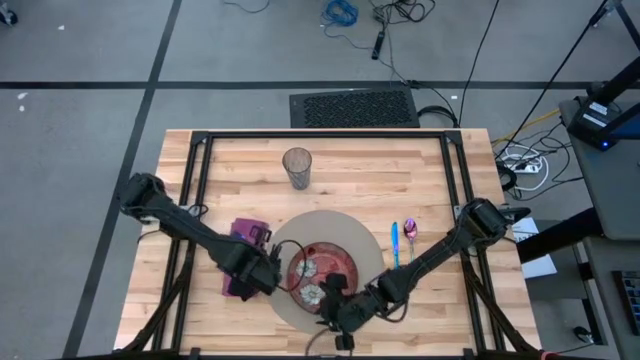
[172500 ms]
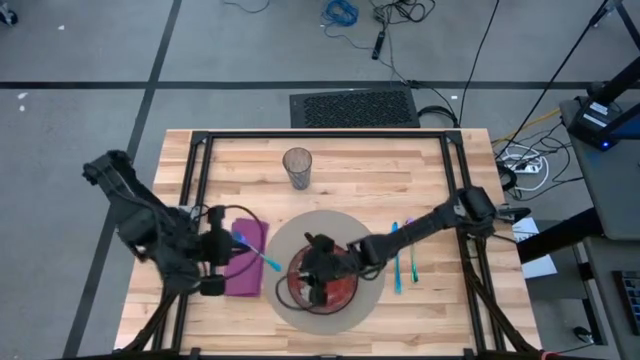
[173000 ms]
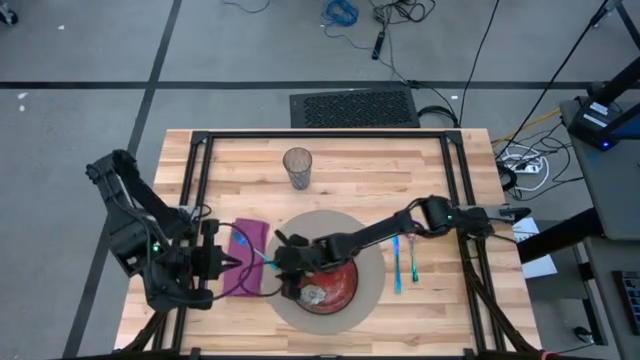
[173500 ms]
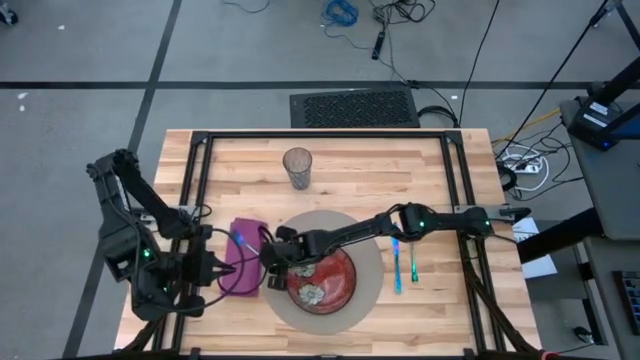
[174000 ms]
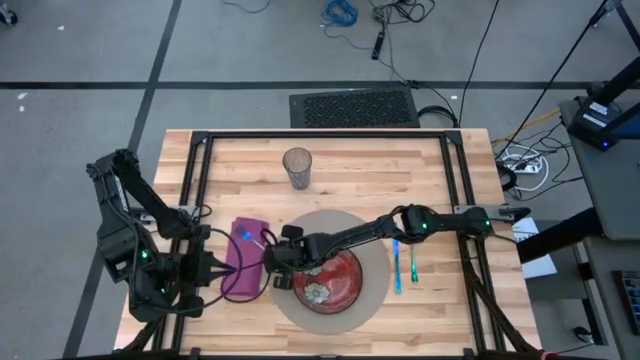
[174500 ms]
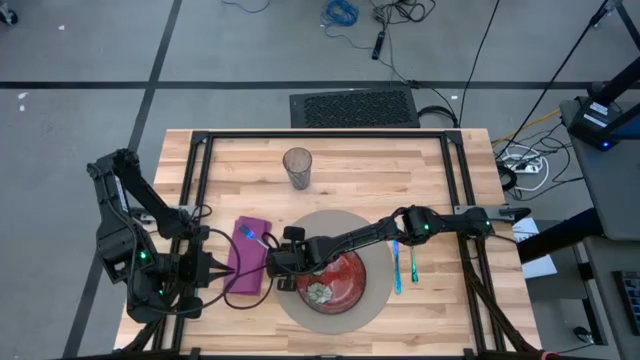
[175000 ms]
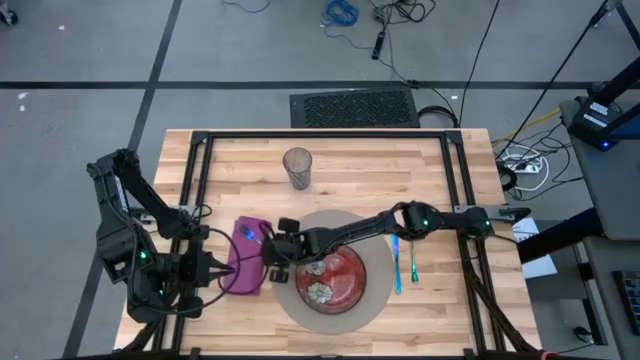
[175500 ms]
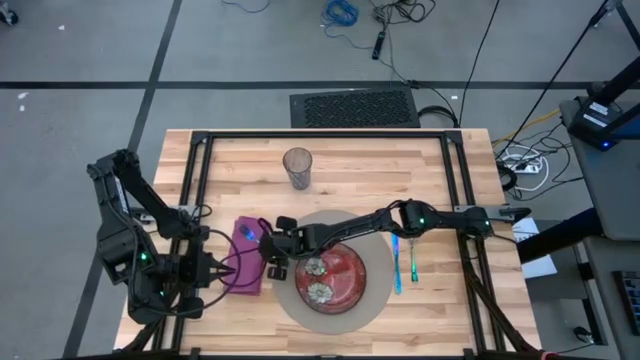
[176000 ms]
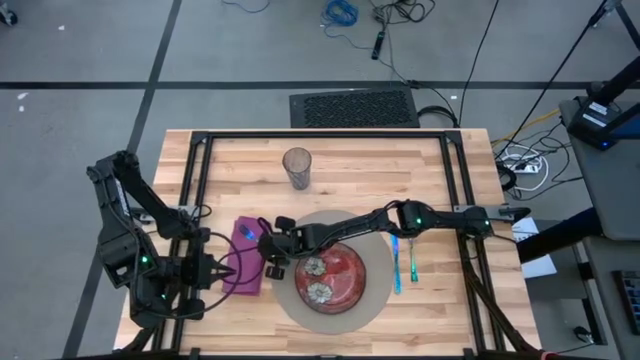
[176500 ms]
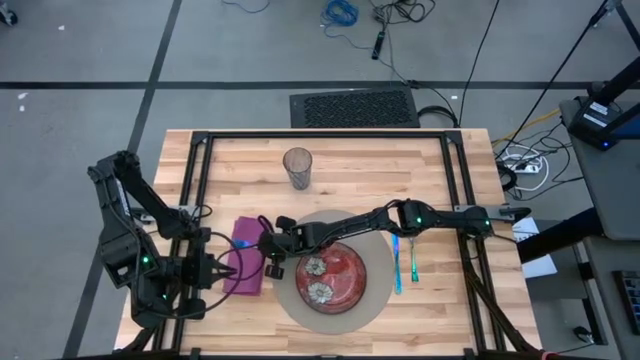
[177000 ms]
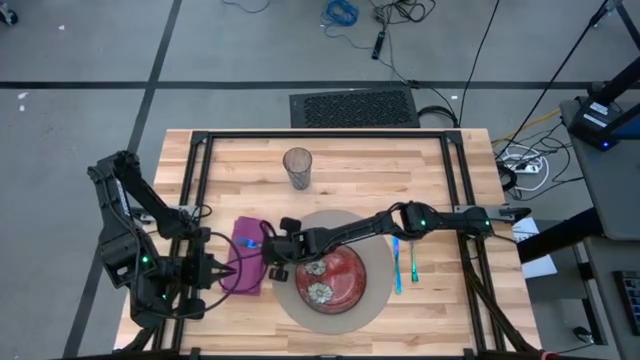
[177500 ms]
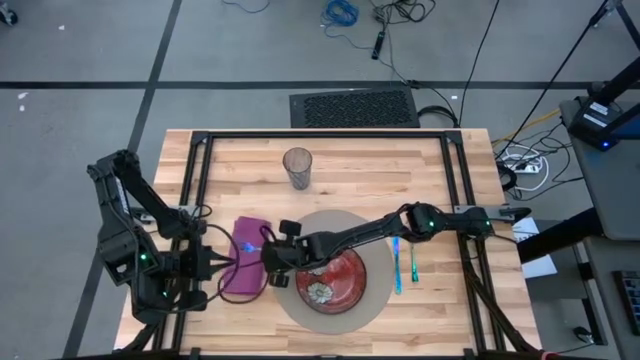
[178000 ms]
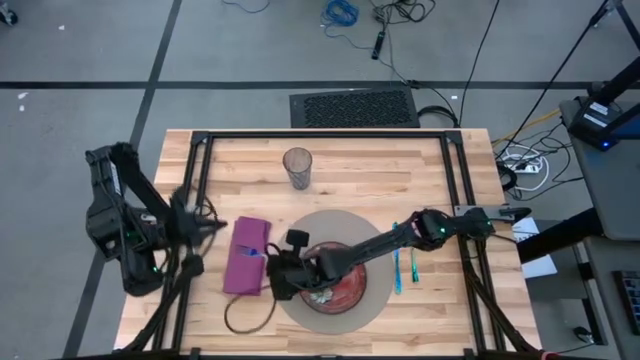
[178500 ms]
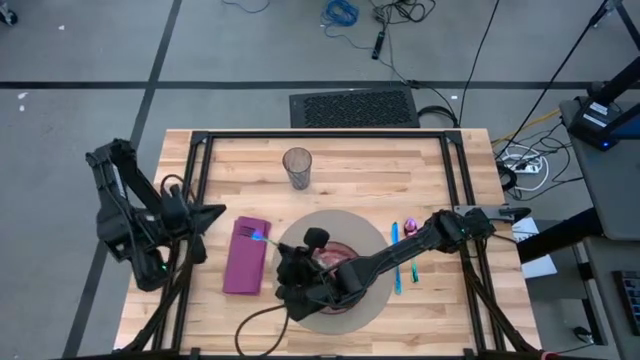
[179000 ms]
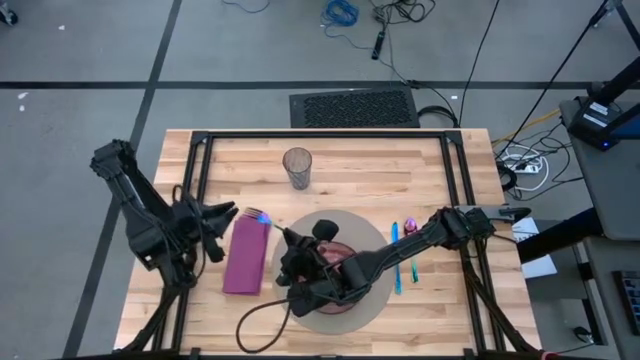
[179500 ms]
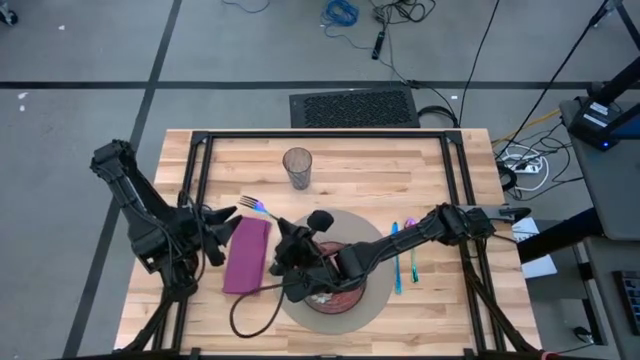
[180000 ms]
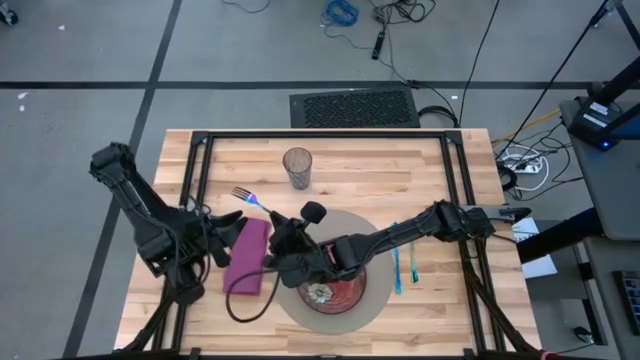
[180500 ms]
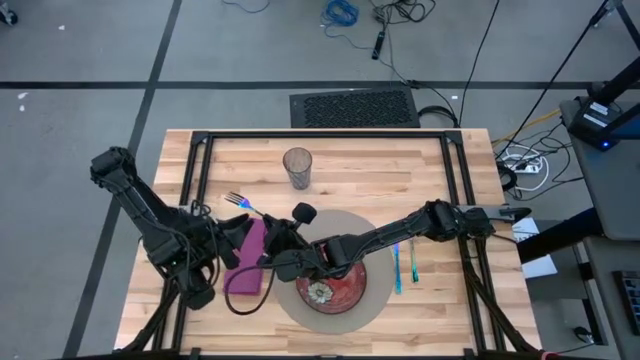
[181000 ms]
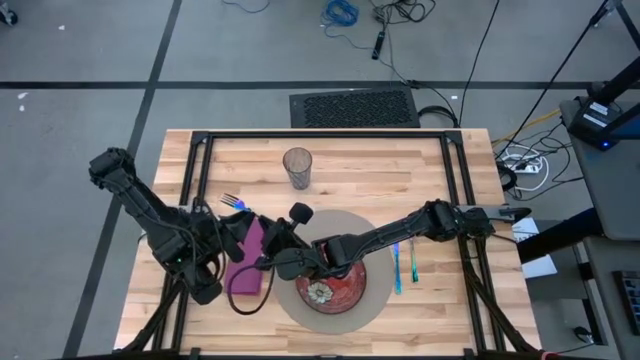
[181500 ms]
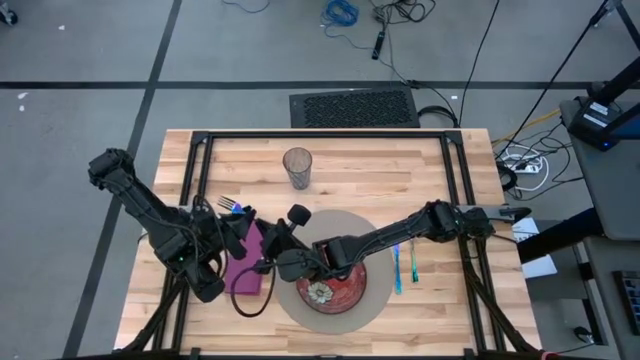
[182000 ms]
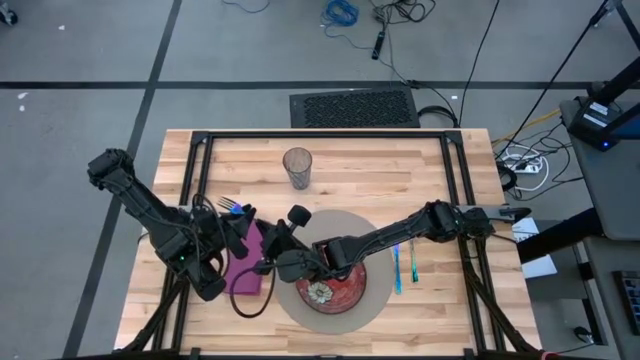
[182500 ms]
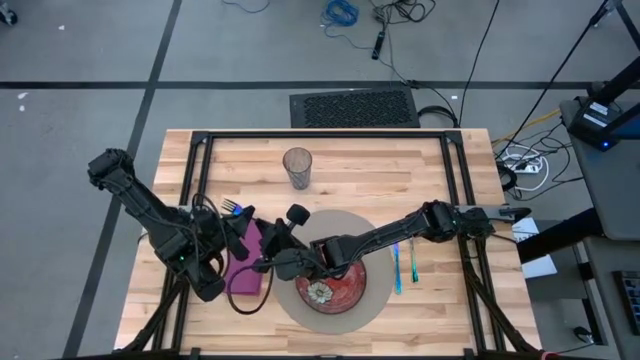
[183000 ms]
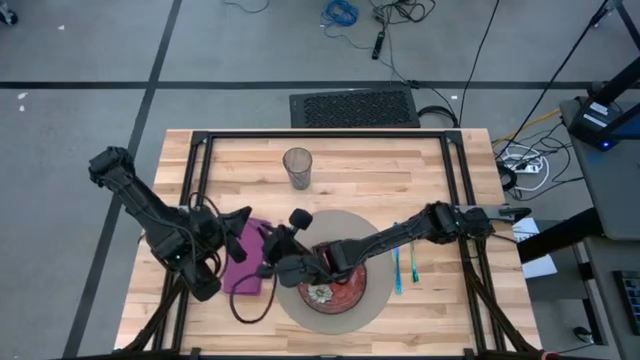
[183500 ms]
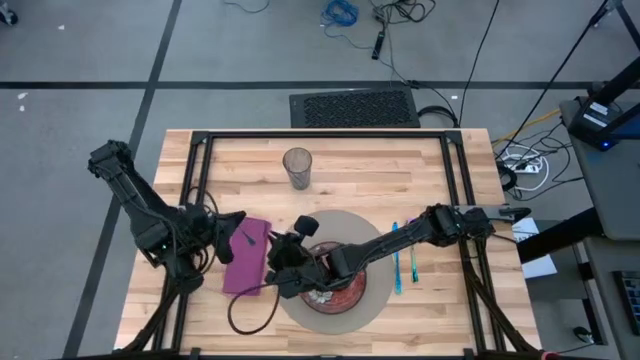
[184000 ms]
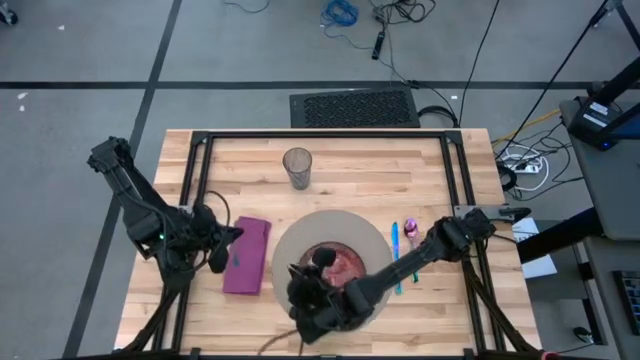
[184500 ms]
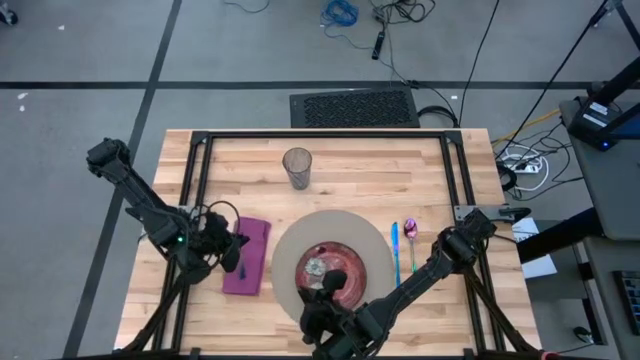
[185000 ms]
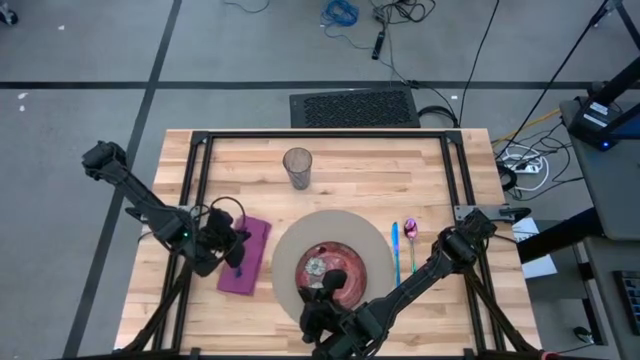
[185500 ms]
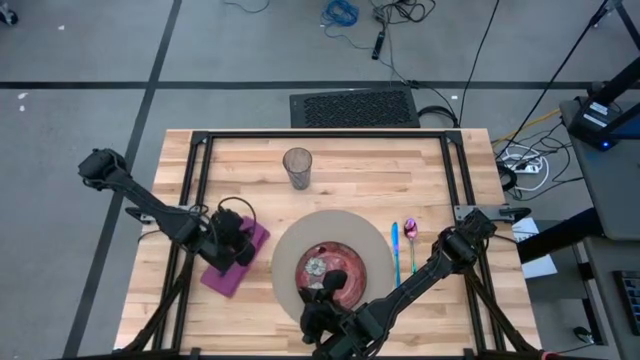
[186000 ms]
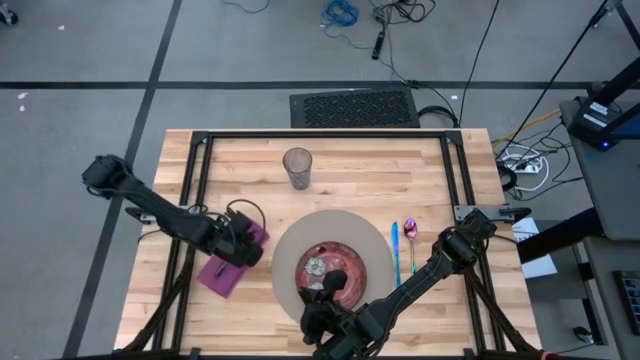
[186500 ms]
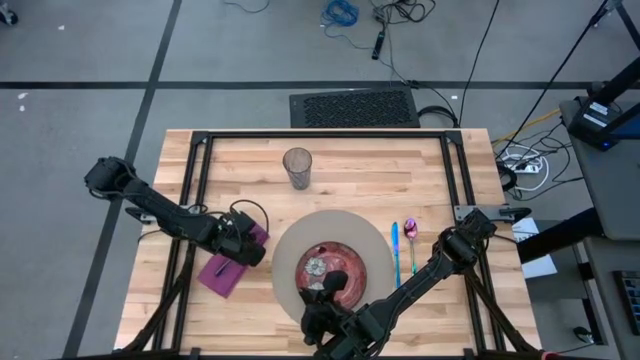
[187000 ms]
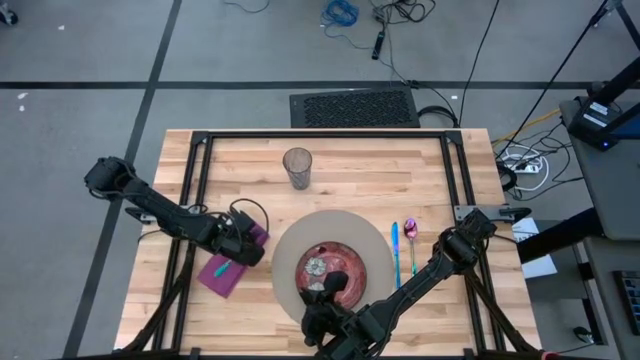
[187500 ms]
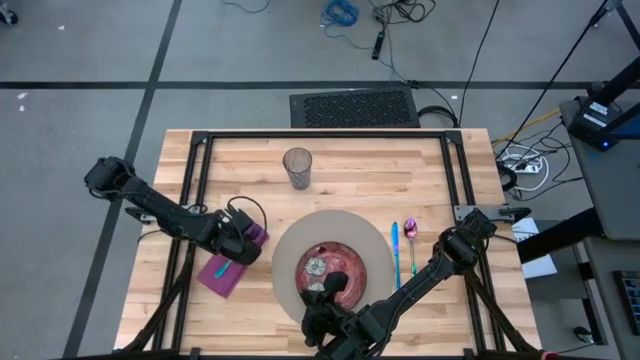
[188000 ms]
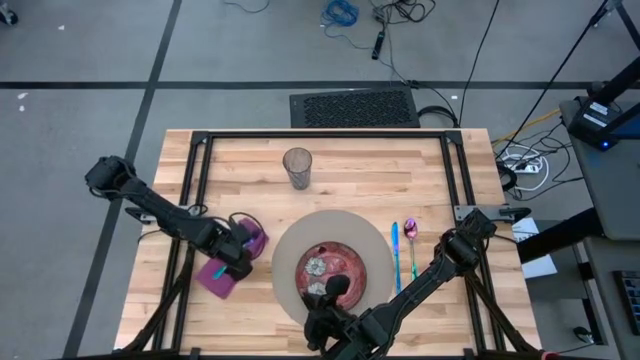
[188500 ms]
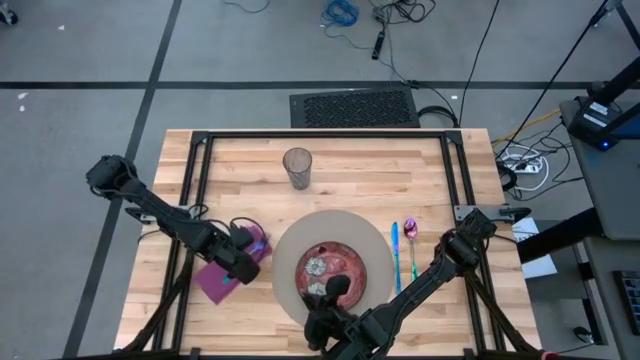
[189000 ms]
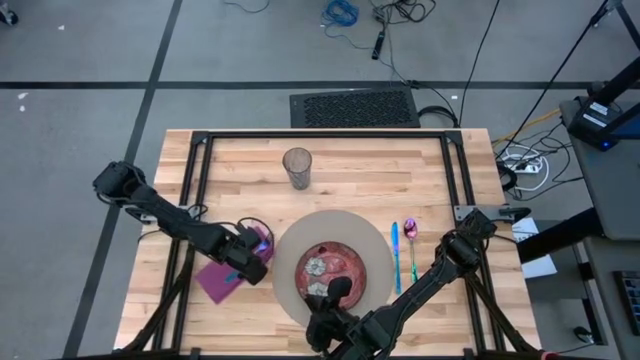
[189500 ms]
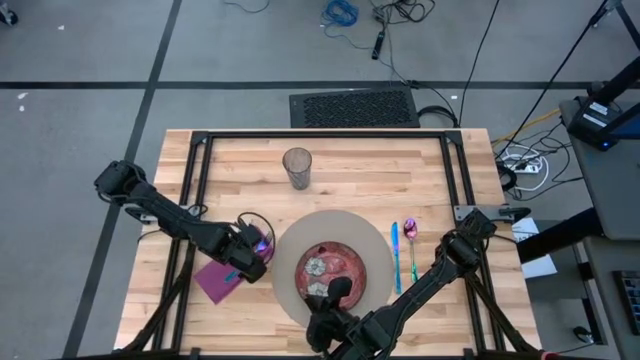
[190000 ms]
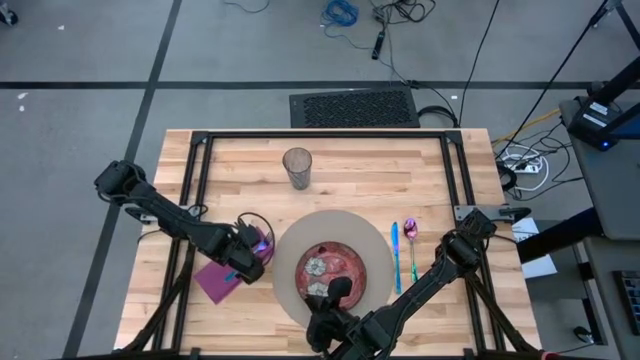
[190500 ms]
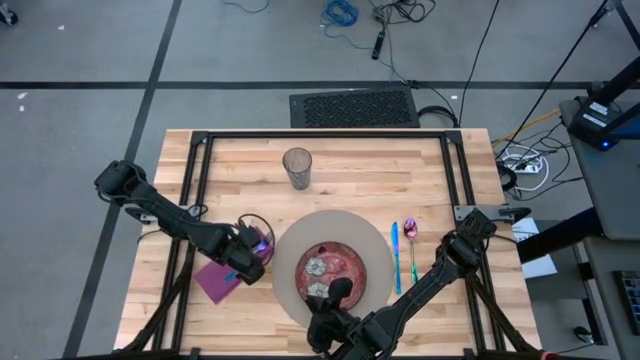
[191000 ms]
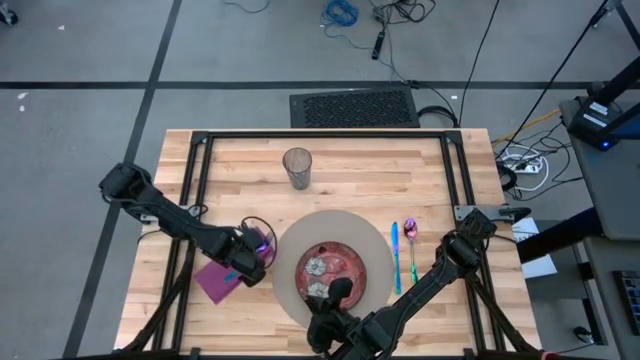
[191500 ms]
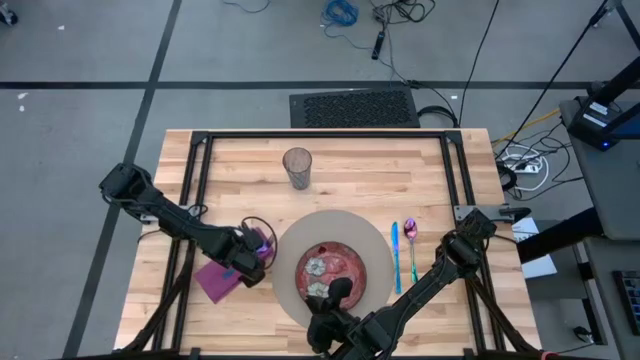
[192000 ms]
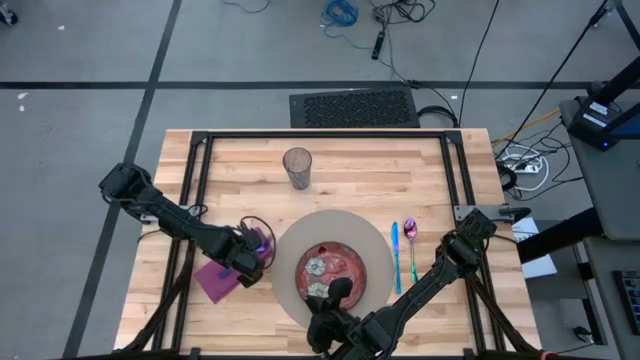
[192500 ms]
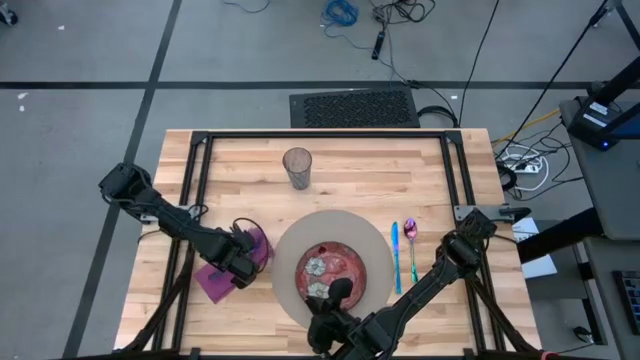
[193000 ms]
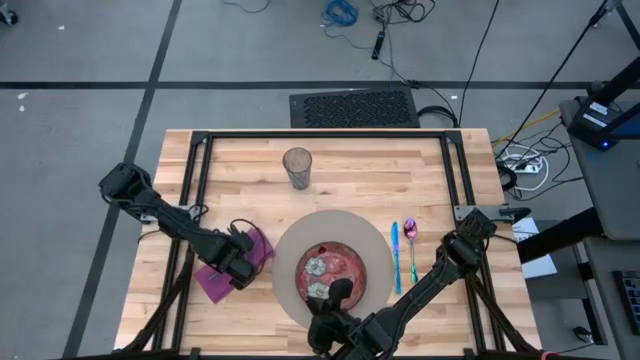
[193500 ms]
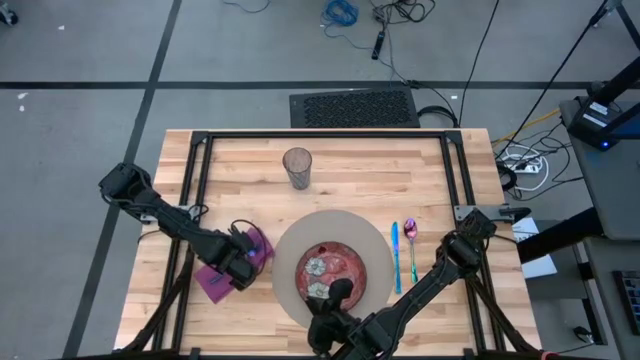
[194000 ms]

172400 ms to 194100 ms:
Task: Set table place
Adjust the blue fork
